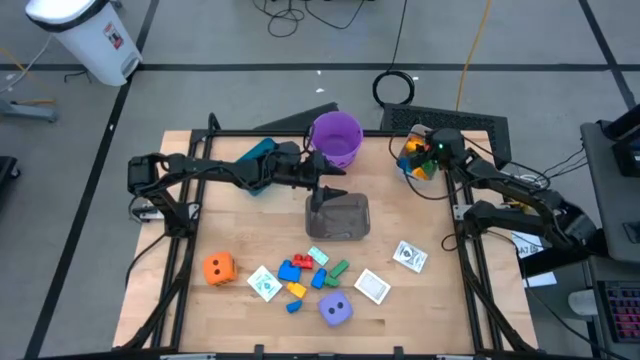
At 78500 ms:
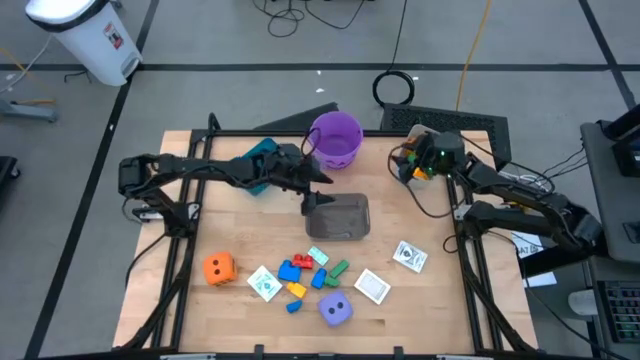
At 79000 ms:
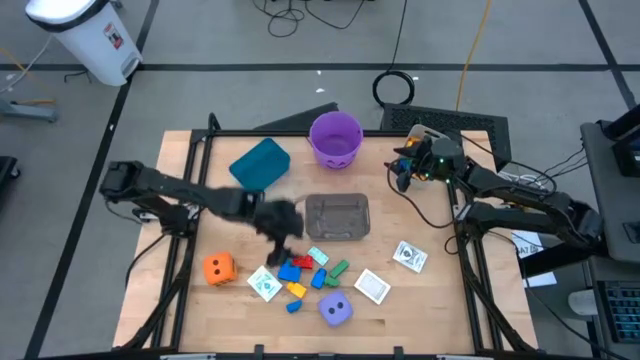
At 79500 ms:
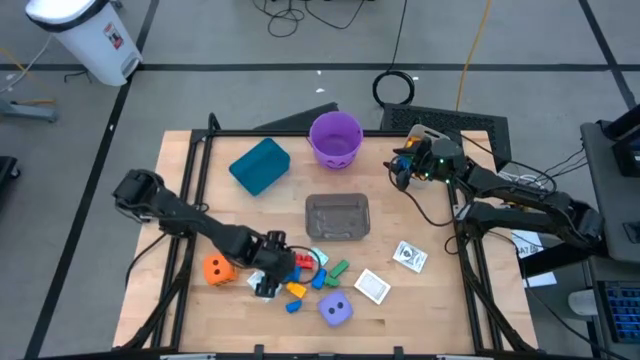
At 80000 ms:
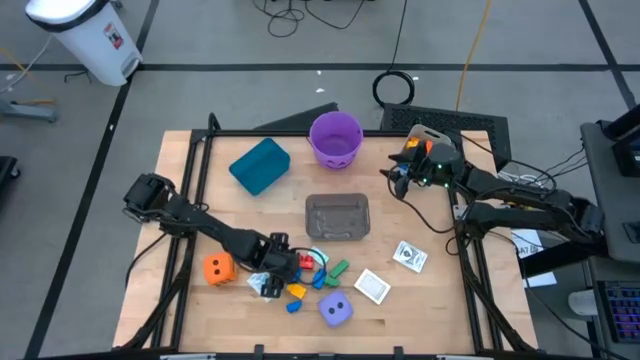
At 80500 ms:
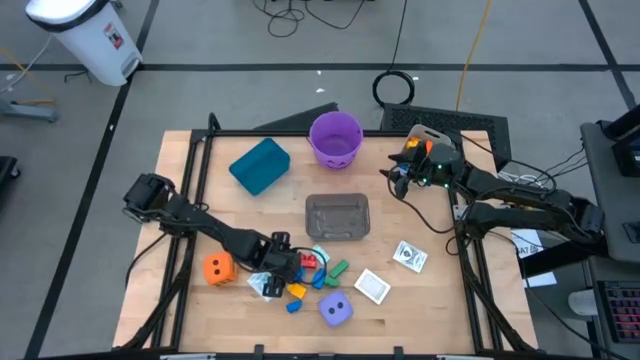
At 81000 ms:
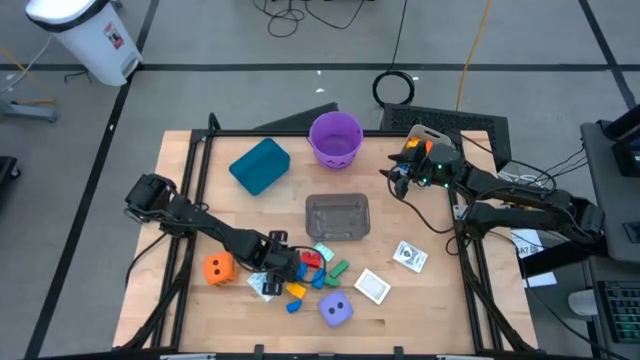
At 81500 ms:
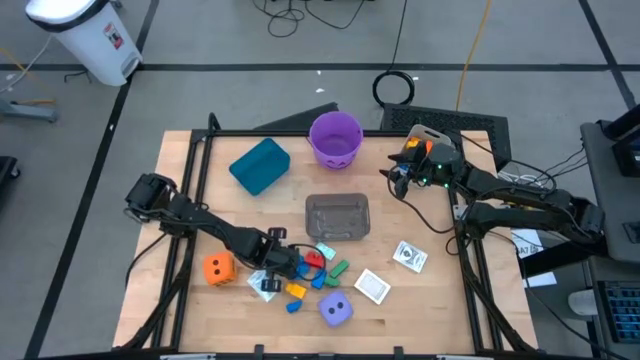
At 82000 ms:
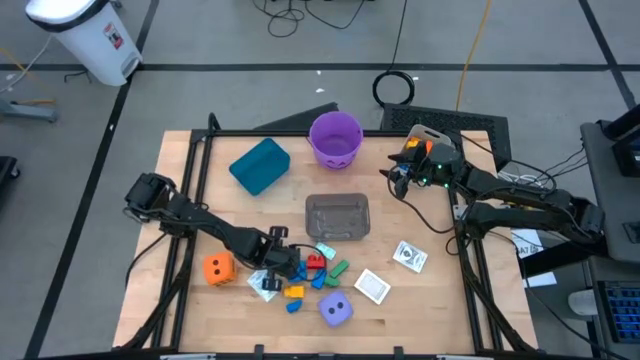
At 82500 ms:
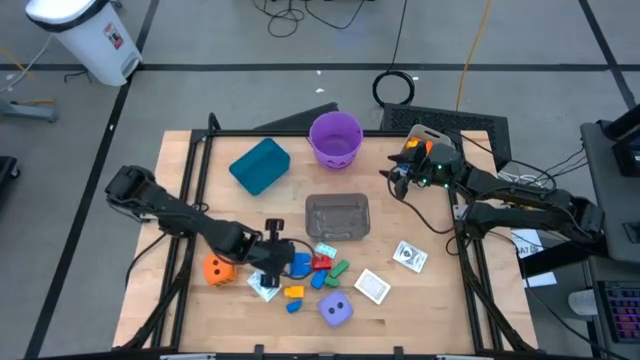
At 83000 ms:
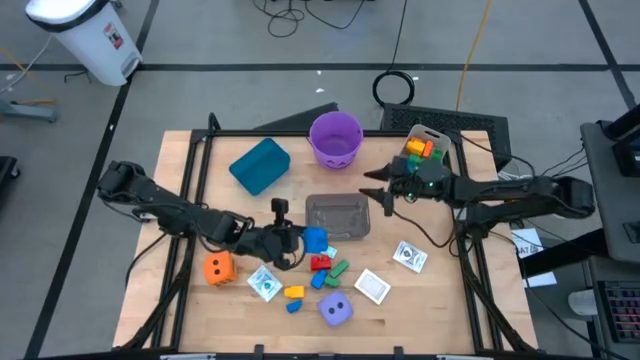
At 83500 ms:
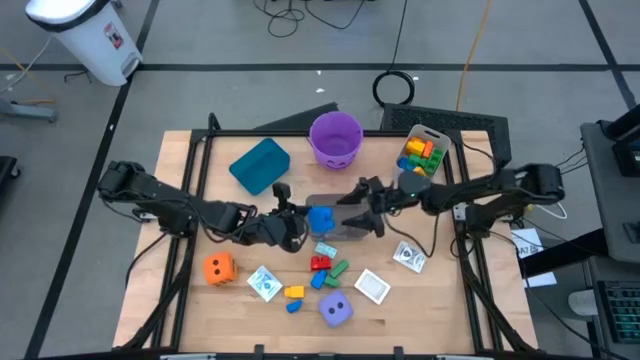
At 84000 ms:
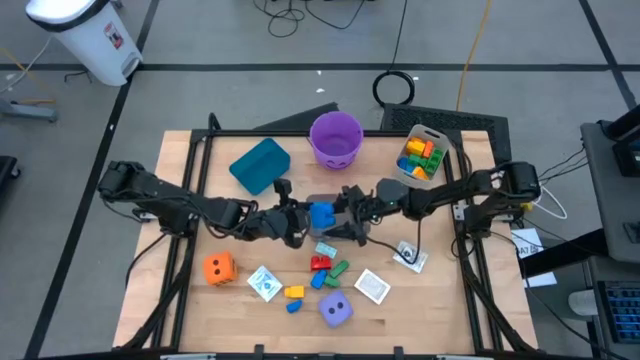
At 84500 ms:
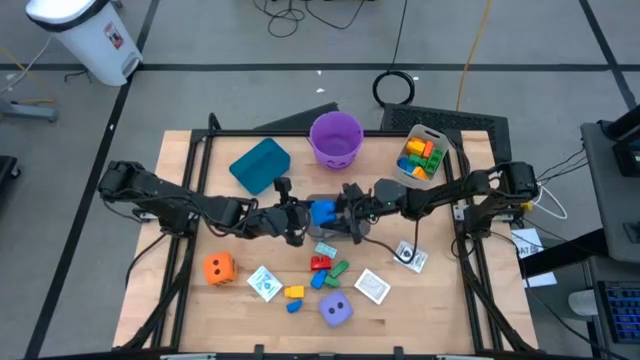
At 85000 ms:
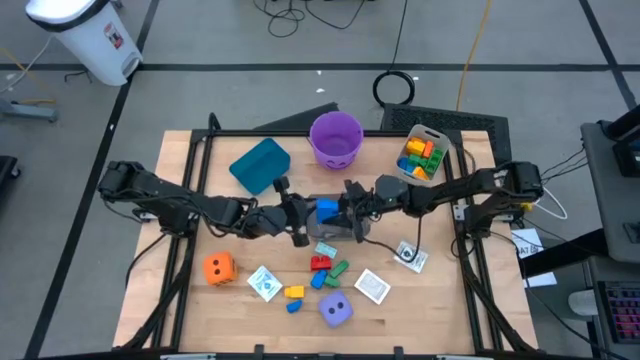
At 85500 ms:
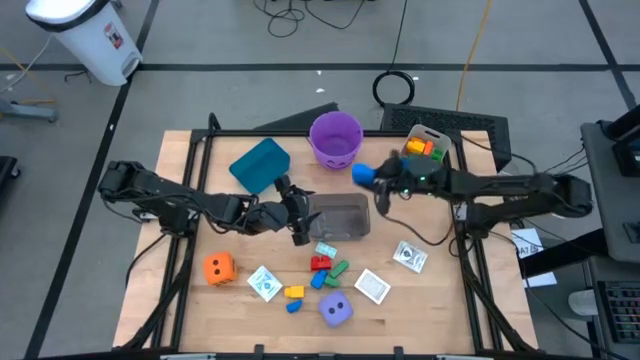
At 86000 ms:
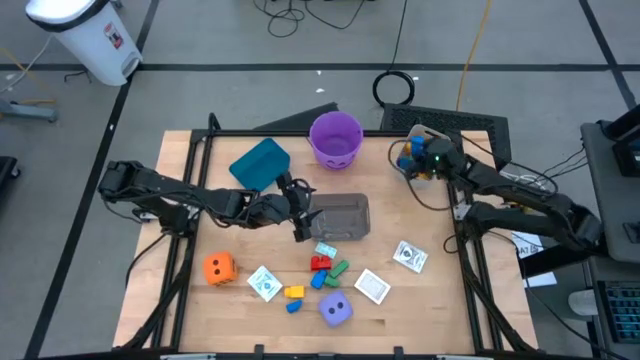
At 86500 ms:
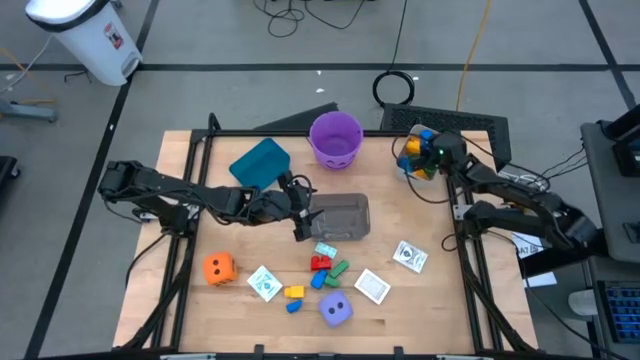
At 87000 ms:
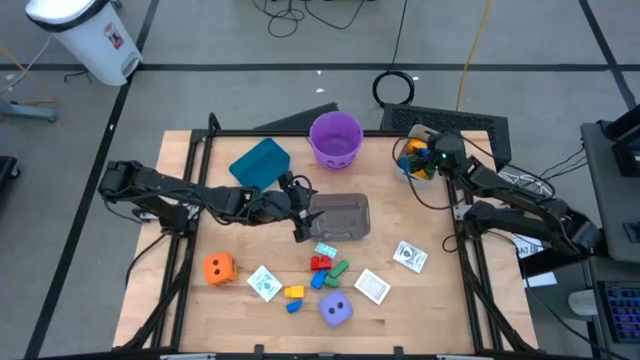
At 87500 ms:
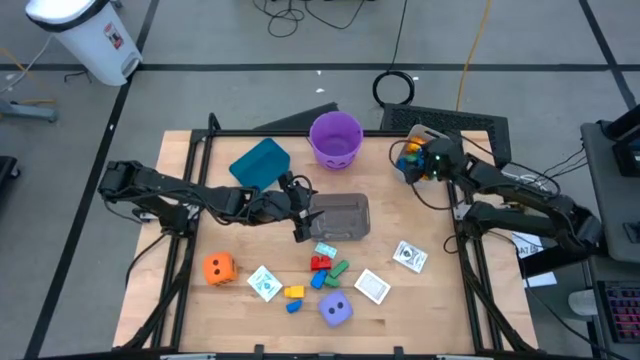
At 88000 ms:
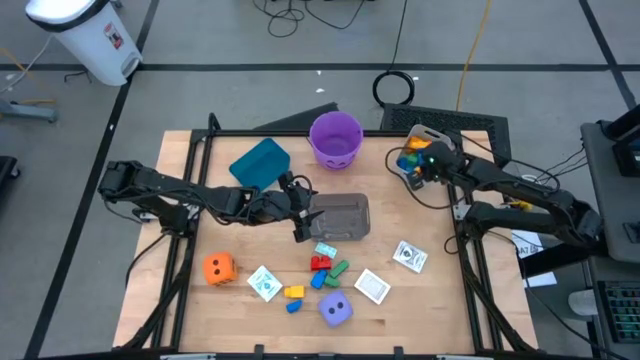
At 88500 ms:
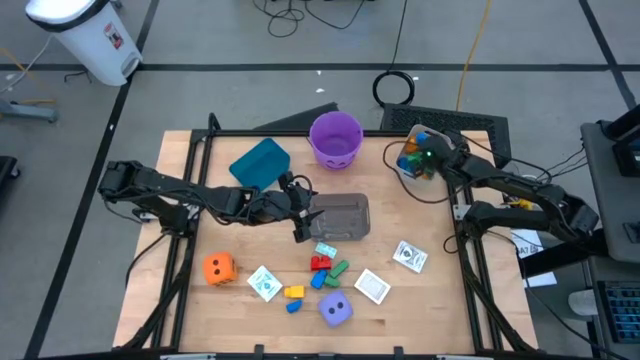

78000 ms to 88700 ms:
Task: Pick & Place Toys
Put the blue game piece into the white bin

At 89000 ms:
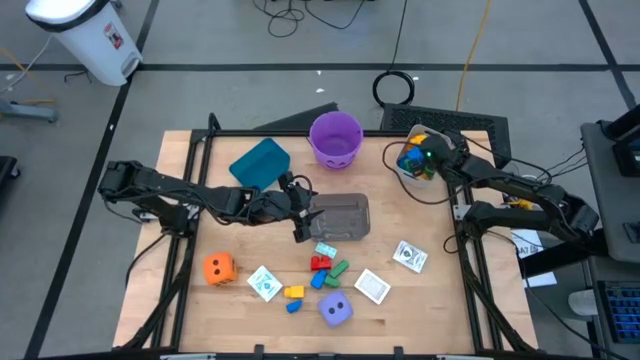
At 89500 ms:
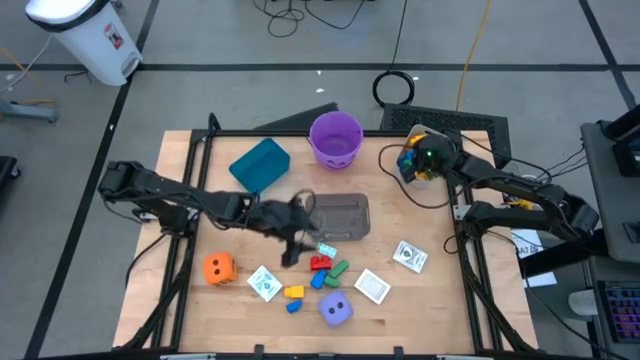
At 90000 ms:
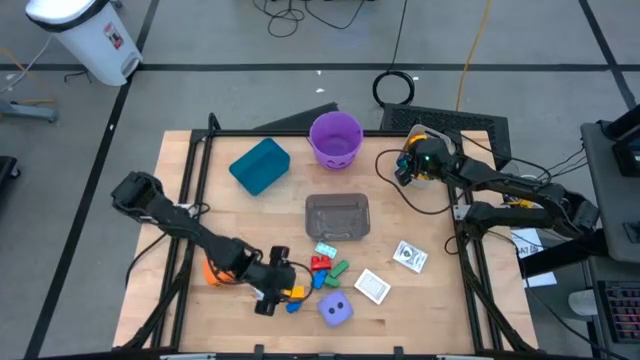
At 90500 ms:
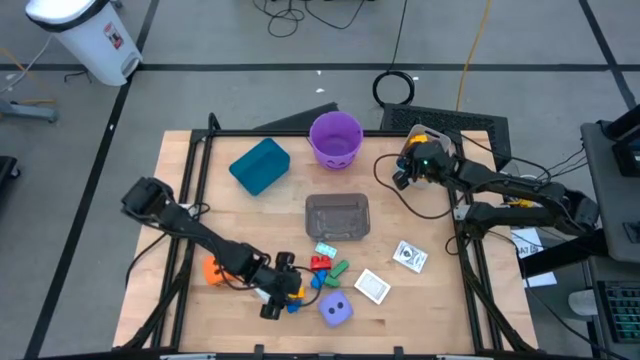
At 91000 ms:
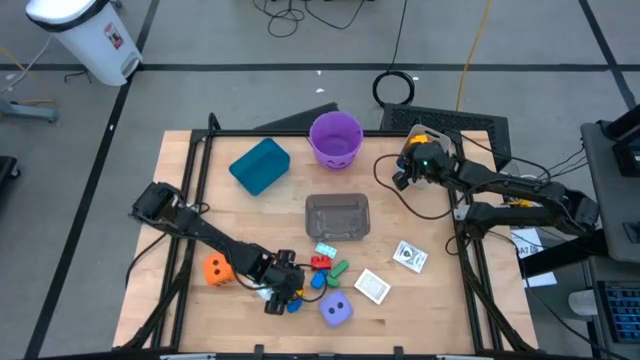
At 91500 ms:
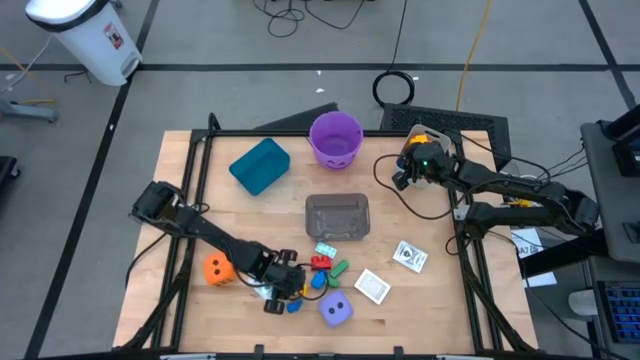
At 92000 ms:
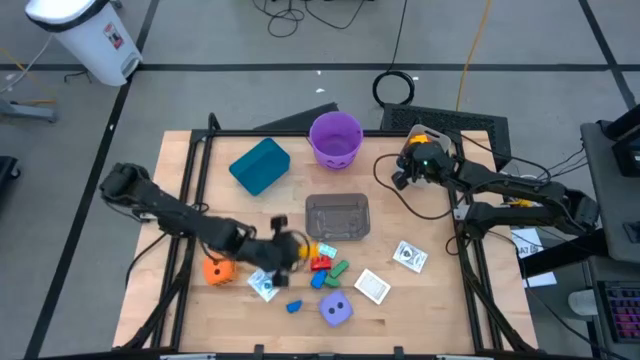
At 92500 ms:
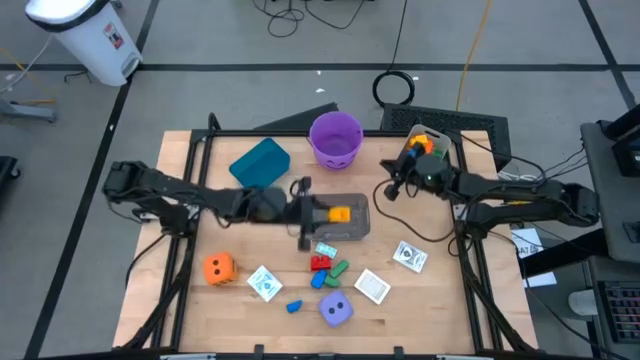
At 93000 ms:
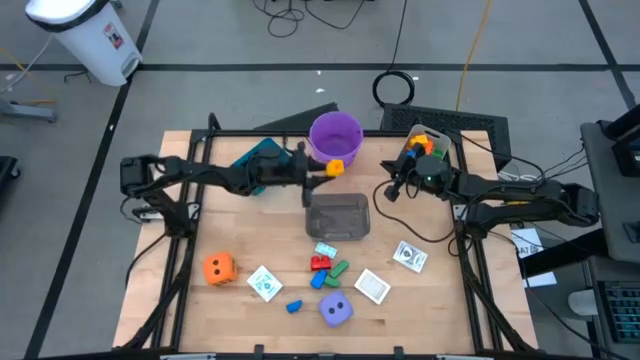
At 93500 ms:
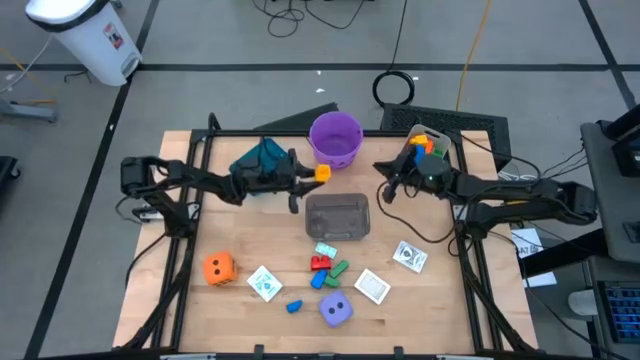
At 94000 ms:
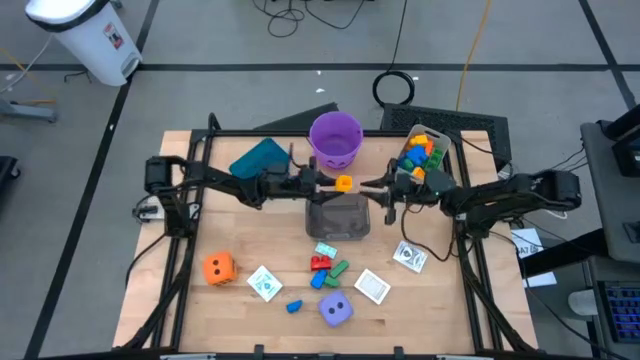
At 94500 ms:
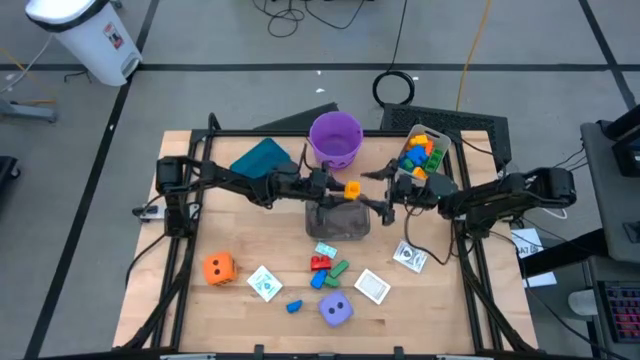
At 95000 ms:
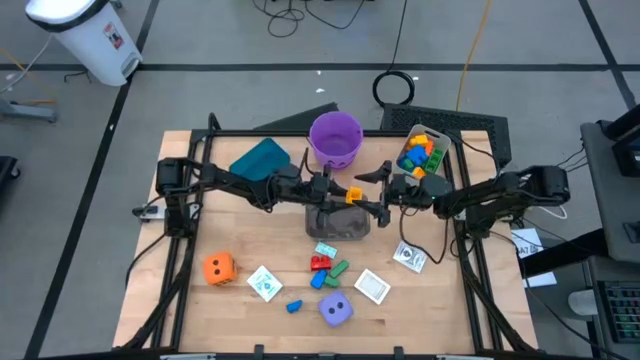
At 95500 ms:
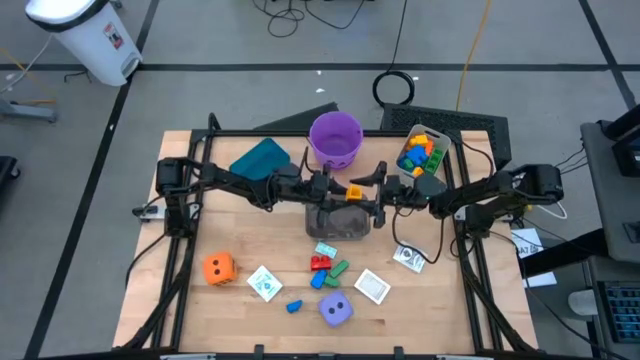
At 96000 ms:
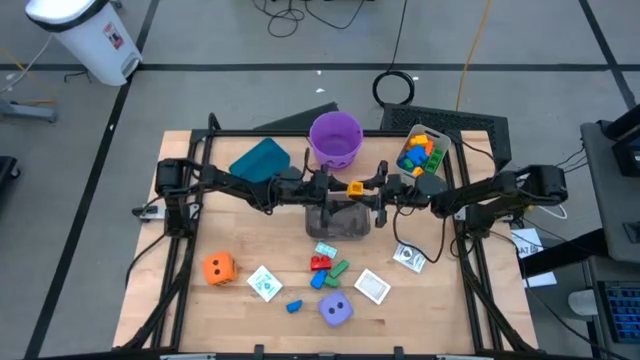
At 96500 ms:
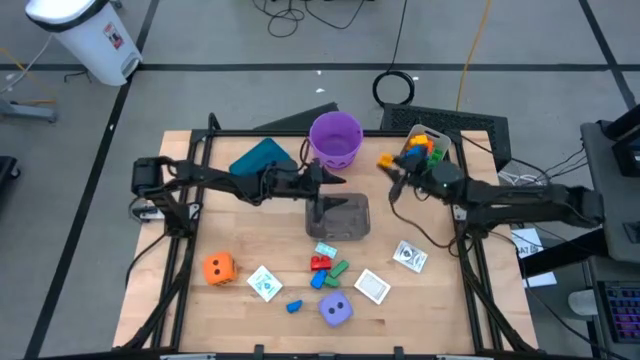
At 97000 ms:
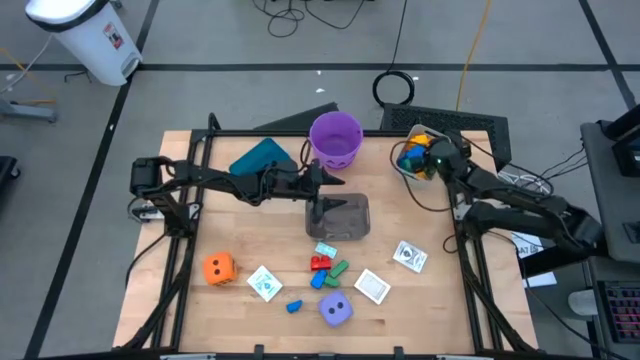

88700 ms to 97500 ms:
Put the yellow game piece into the white bin

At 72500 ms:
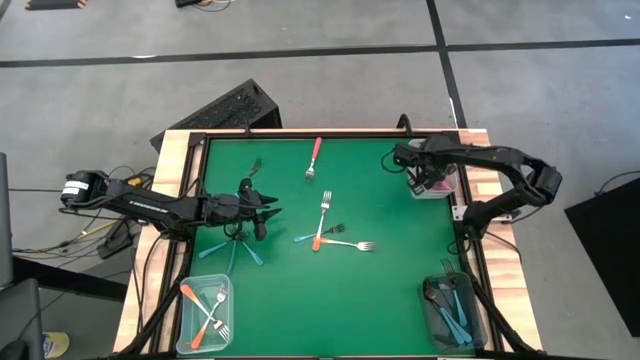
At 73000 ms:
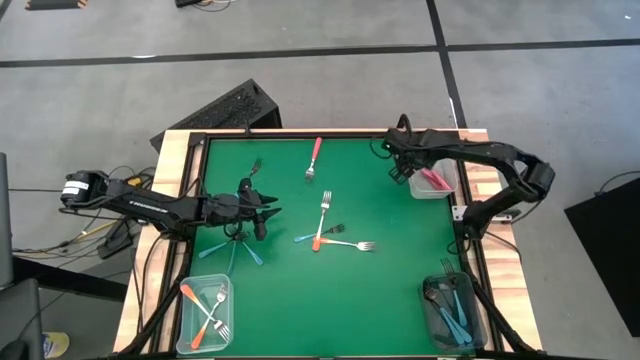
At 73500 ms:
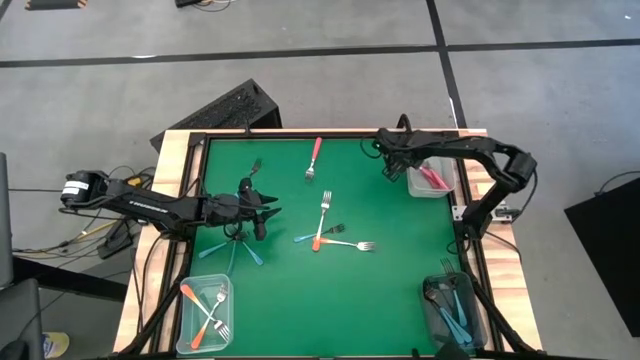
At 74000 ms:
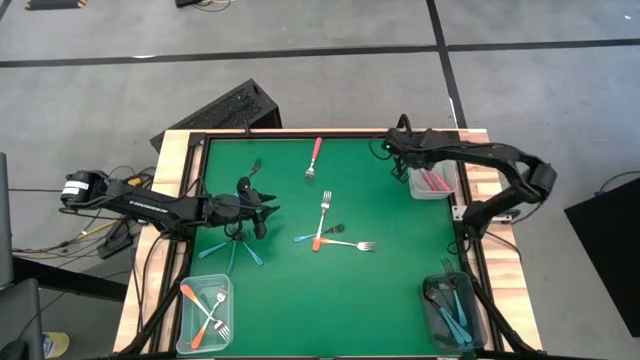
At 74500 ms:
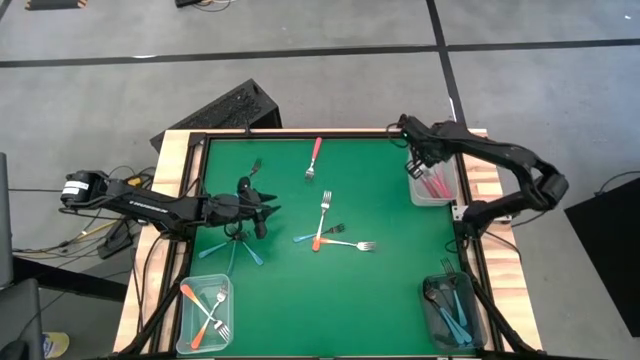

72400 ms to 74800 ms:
Task: Sort silverware by color (type)
Adjust the pink fork in the white bin
